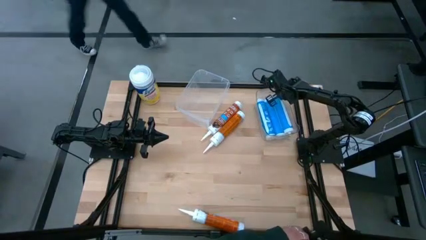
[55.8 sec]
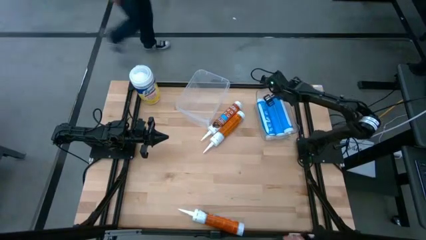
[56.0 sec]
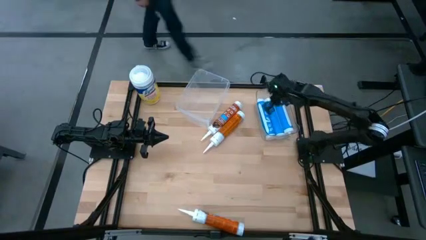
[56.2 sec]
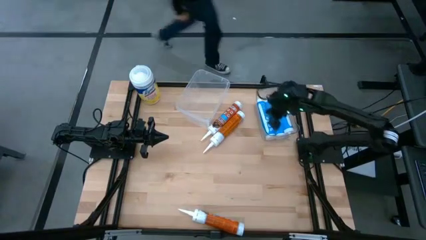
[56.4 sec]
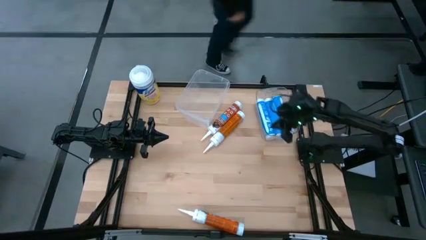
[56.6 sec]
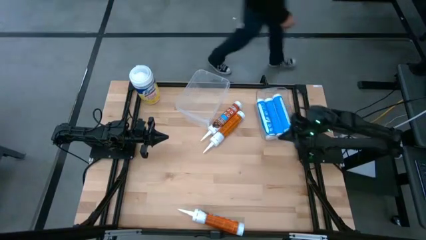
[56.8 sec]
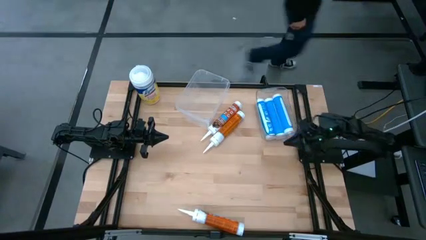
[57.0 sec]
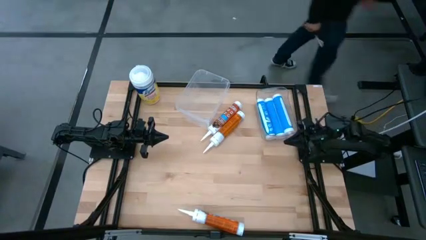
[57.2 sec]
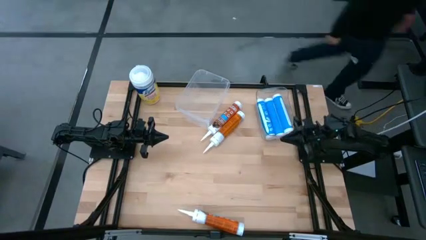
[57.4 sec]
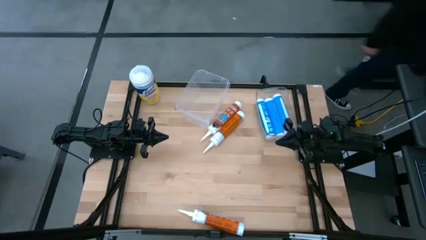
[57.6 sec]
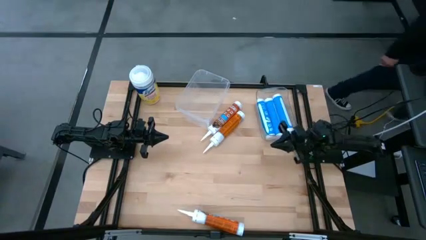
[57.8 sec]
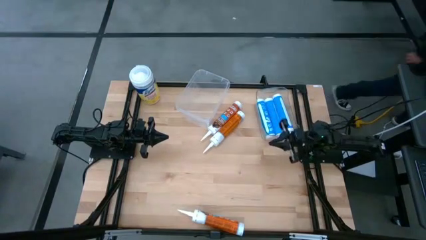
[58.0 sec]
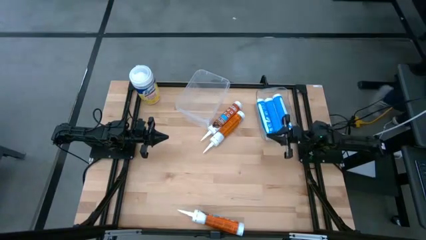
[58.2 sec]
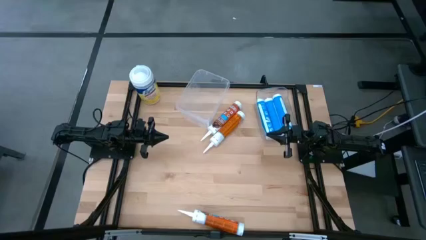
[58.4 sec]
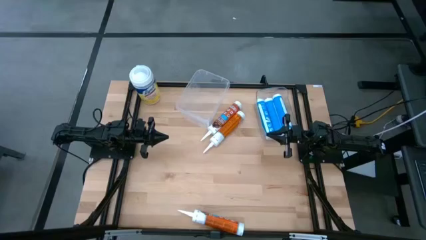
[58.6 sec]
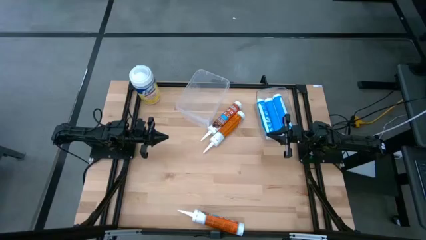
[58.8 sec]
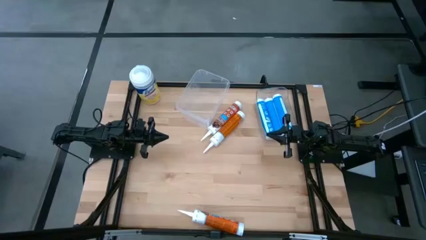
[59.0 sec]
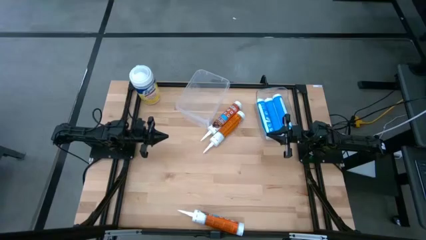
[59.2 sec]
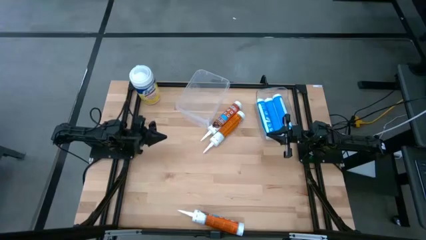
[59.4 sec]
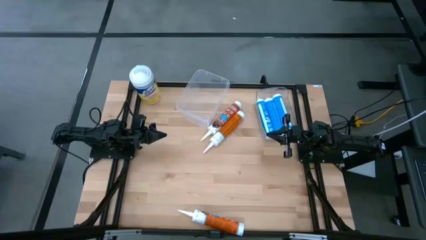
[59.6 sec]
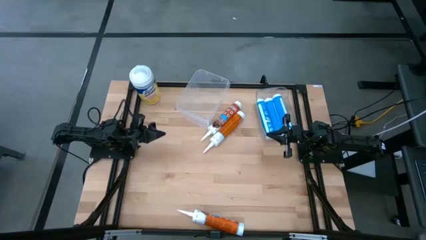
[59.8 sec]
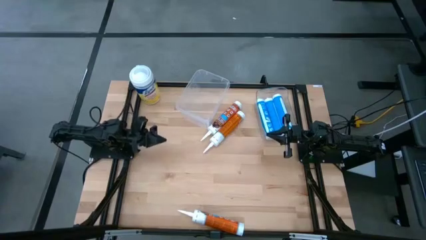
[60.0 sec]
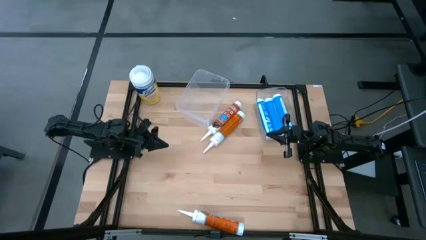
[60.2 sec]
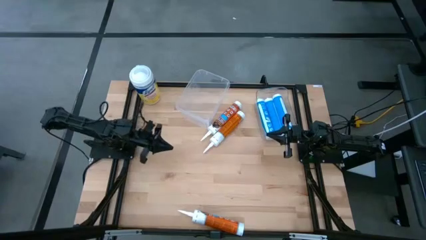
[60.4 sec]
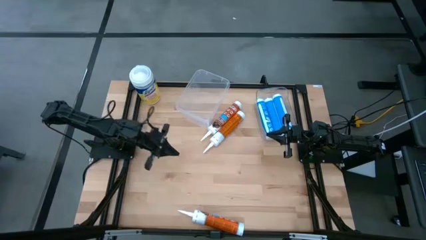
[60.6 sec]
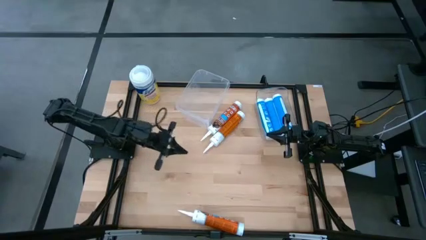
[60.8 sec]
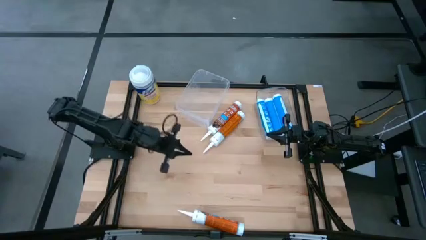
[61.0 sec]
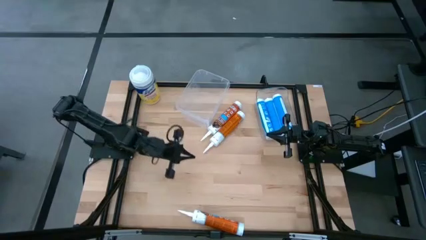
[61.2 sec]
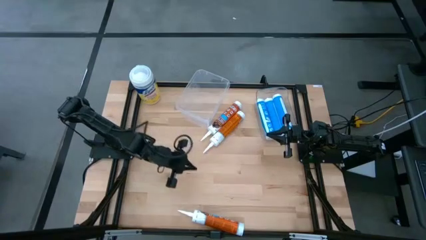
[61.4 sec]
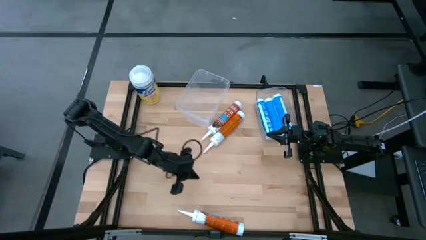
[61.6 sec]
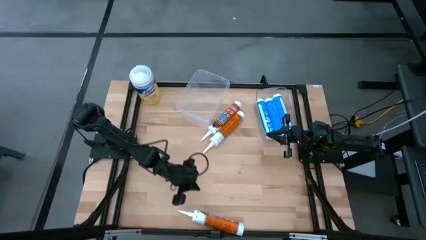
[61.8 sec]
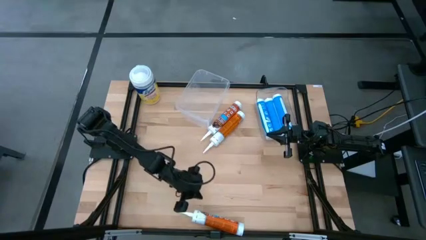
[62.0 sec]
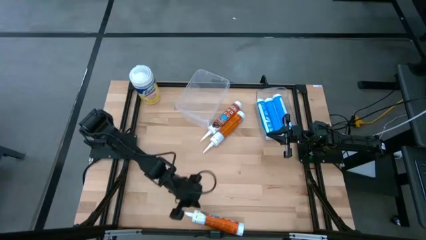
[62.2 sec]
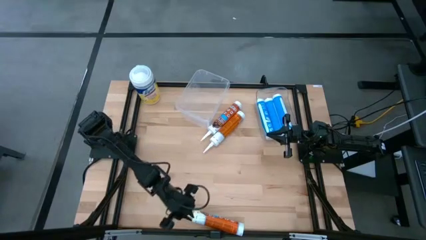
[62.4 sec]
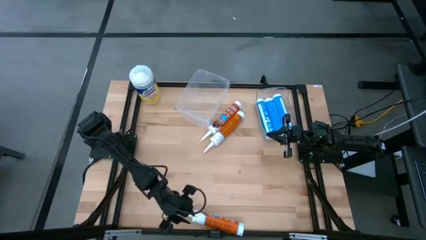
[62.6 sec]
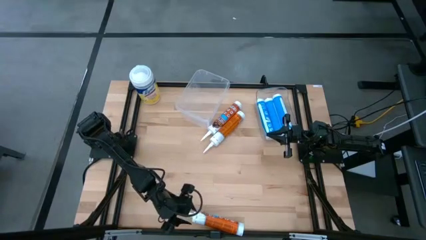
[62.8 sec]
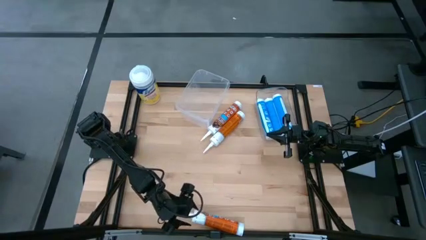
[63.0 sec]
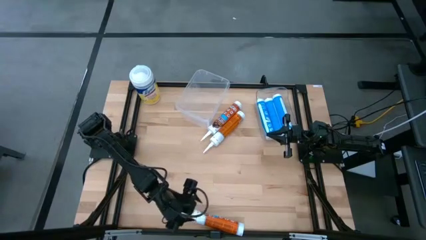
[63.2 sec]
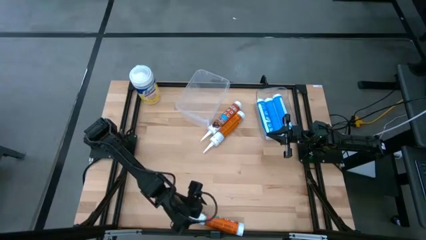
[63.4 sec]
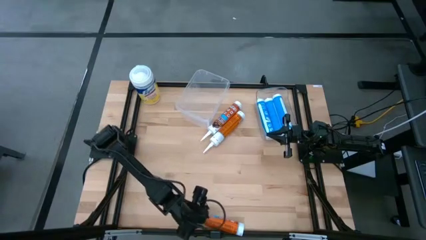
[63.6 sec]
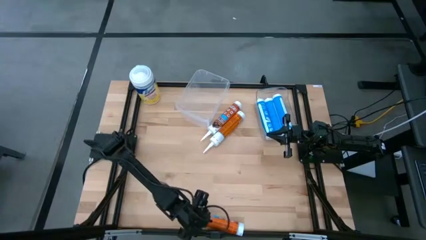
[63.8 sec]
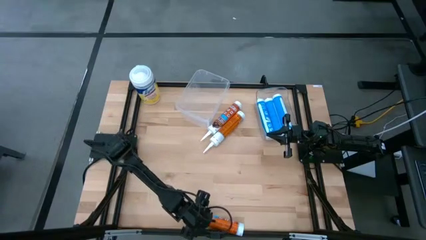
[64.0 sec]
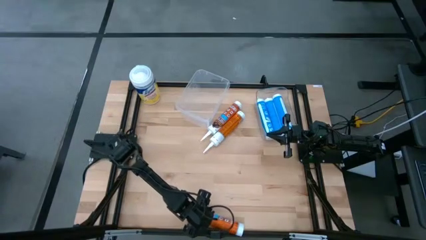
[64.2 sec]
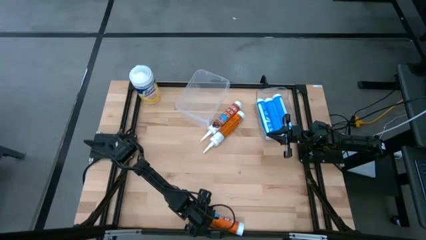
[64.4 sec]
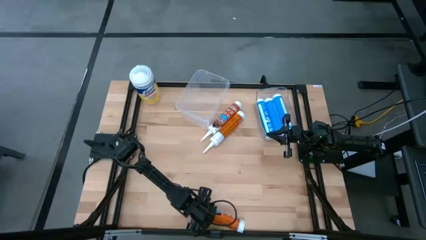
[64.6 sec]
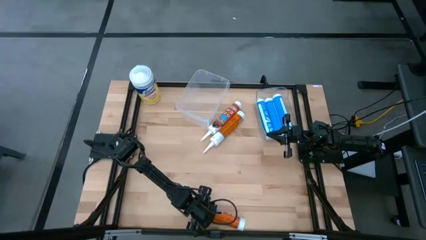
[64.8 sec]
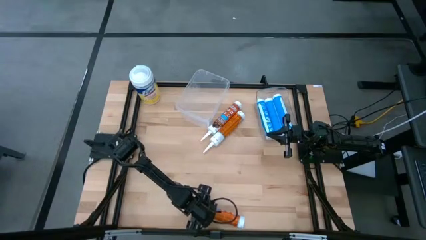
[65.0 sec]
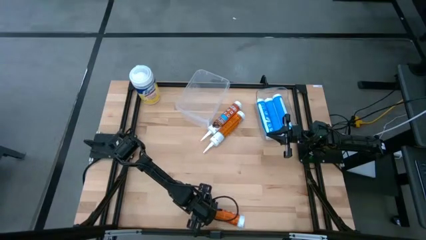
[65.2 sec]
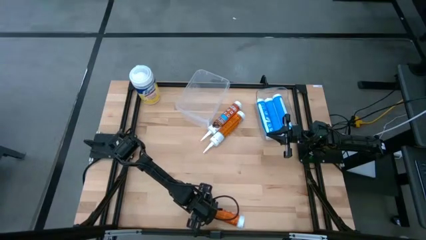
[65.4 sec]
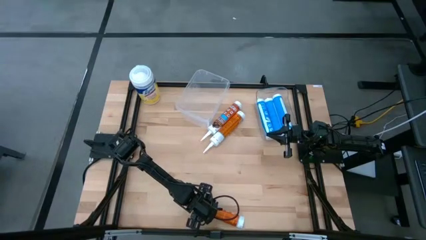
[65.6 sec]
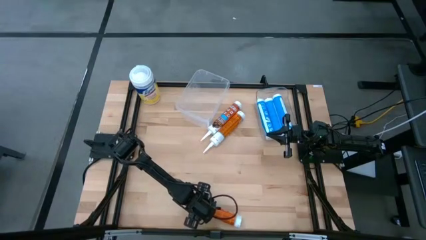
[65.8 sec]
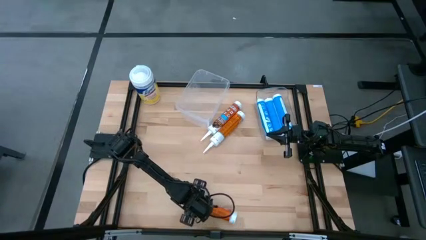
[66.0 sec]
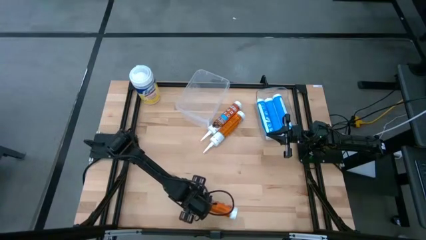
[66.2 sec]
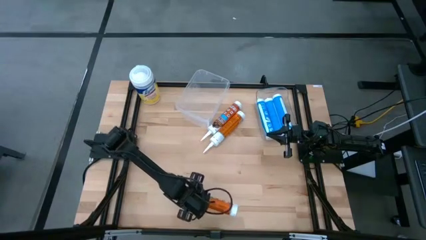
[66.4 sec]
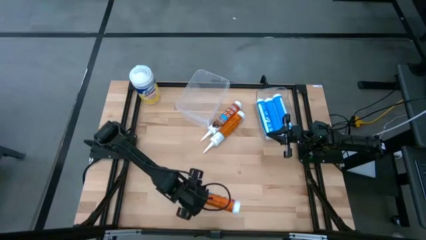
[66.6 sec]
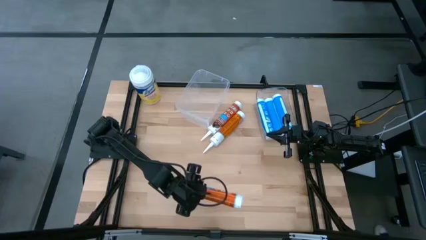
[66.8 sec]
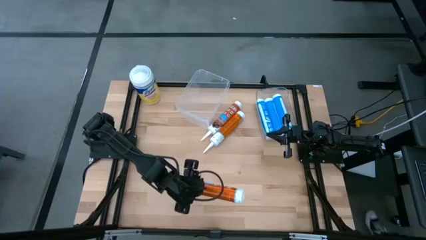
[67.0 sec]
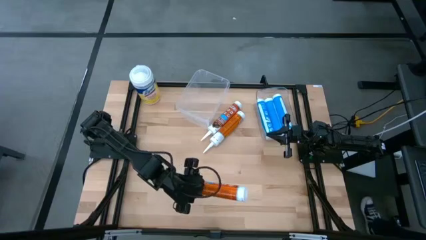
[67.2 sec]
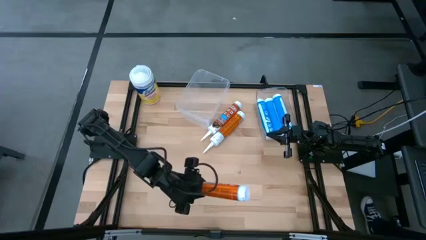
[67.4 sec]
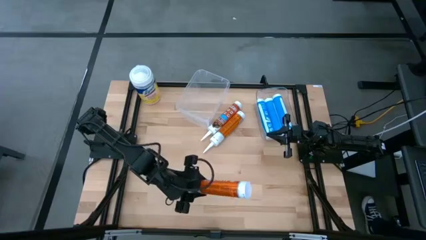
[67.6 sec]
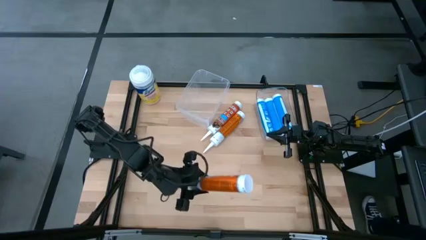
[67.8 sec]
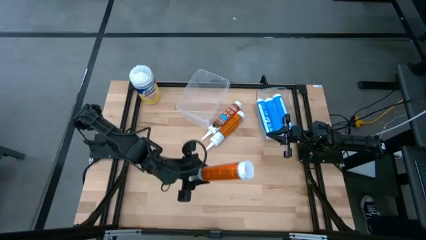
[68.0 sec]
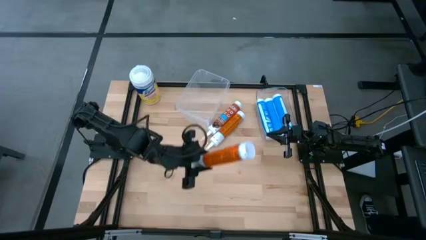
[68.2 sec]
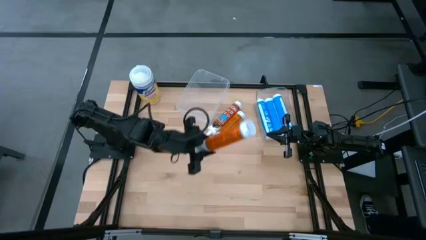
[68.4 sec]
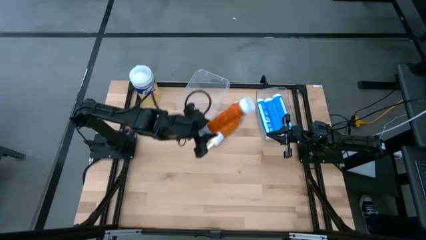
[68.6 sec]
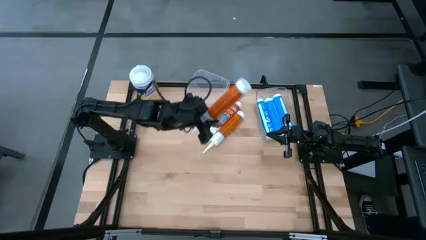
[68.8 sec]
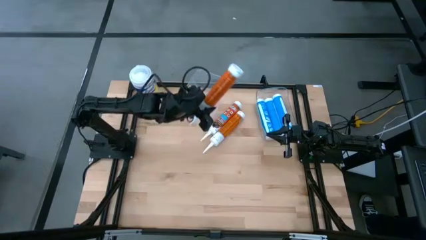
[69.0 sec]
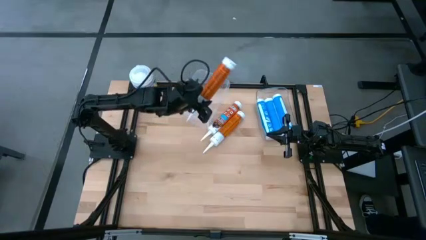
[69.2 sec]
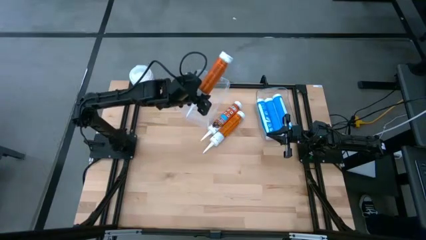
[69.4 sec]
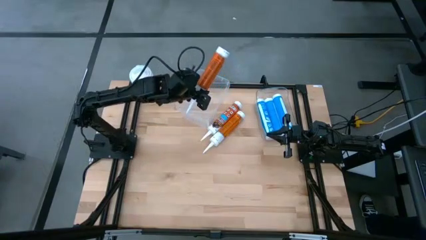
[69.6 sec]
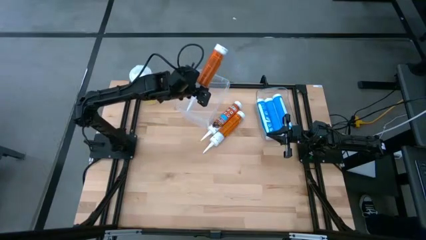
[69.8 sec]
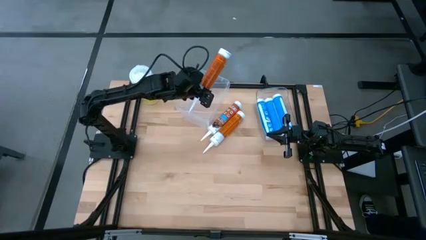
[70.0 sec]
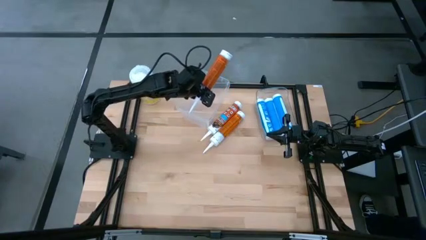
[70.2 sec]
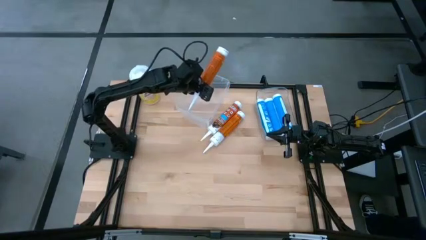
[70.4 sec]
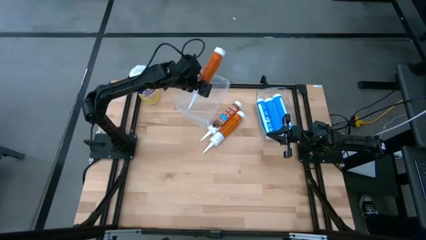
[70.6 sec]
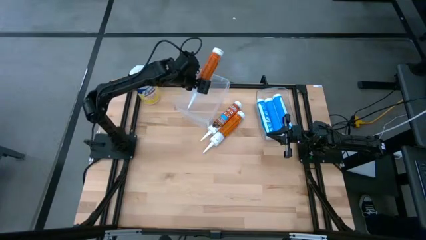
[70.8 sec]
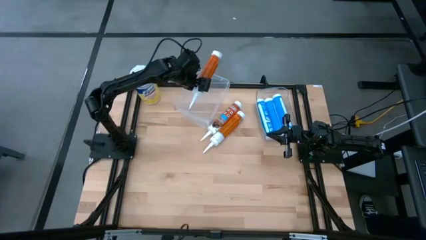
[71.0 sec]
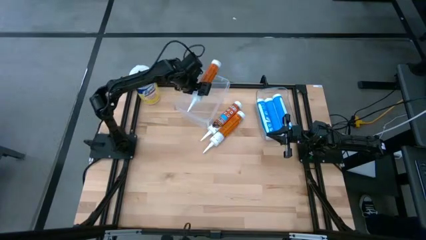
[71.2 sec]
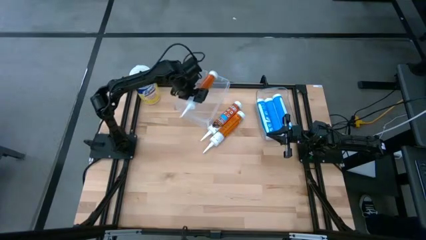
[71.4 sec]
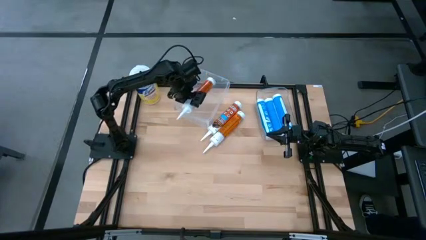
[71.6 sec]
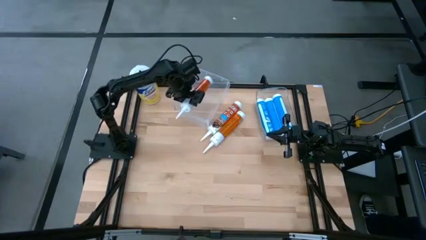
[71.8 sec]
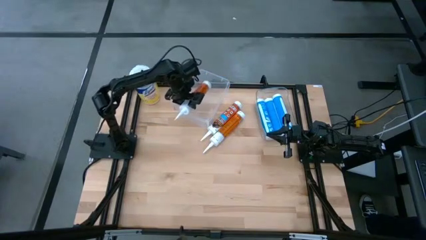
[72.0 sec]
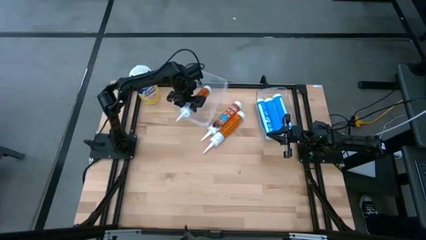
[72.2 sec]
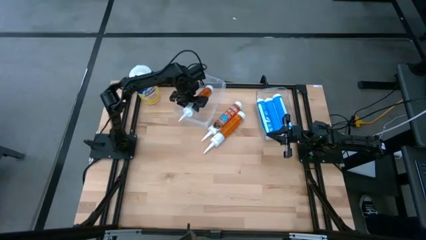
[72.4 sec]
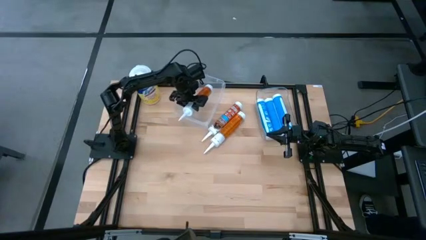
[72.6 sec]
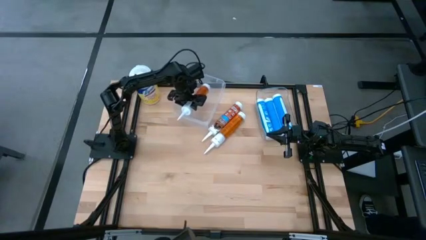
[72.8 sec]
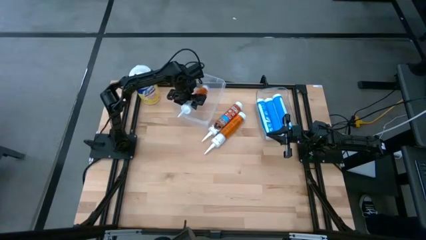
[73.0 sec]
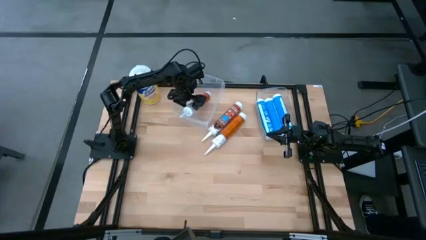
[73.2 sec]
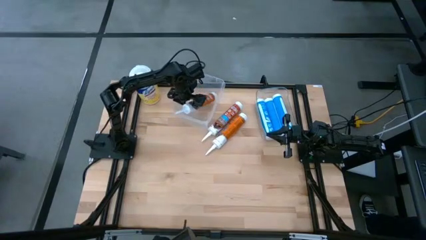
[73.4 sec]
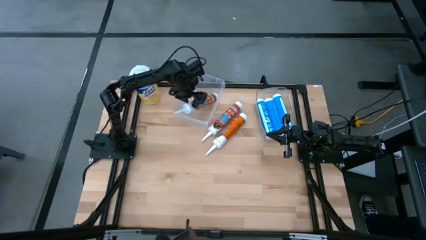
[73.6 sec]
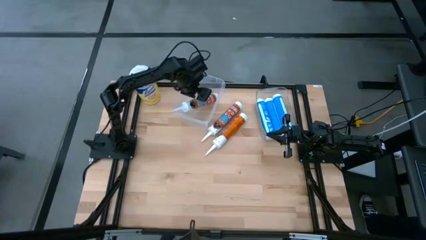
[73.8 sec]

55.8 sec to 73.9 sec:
Task: Pick & place silicon tubes, Sealant and Lysol wipes
Put the bottom orange sealant into the transparent container
